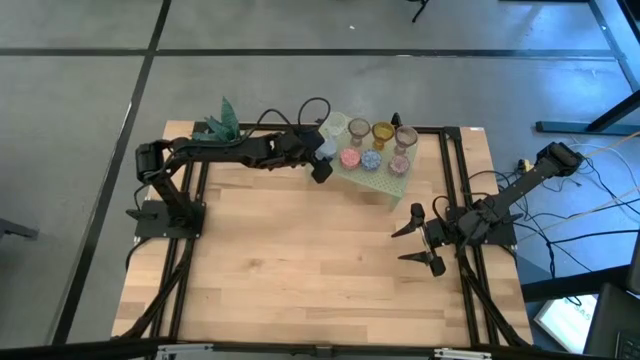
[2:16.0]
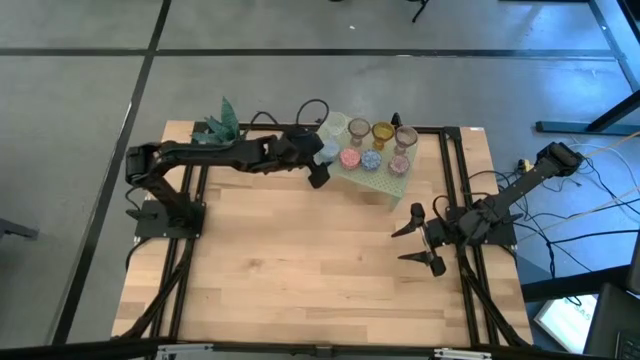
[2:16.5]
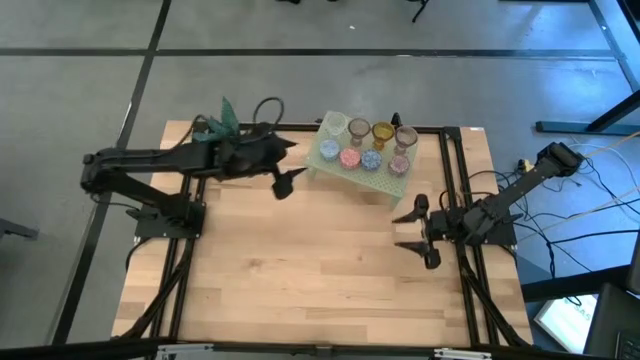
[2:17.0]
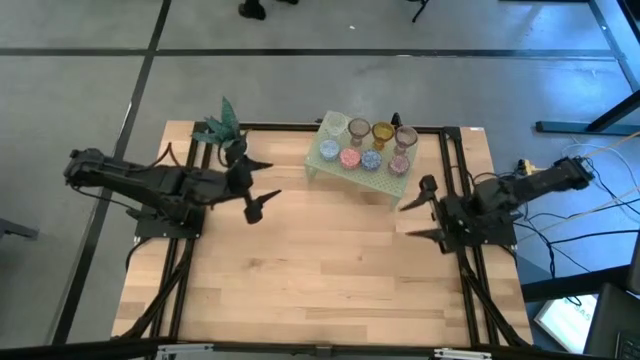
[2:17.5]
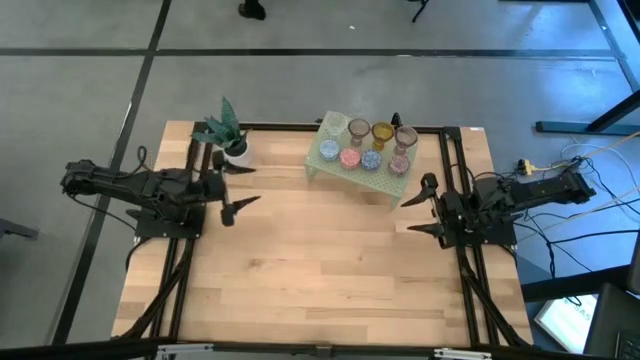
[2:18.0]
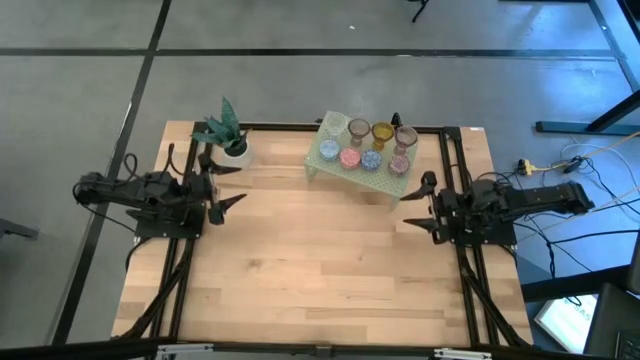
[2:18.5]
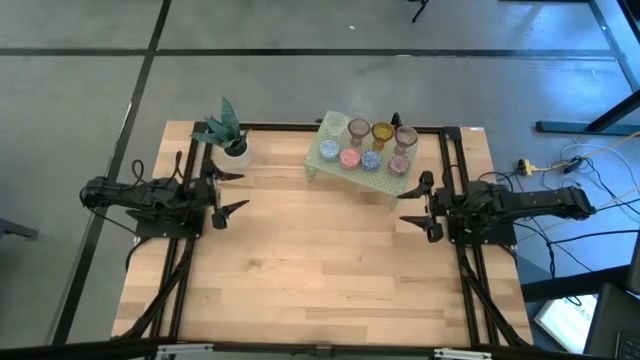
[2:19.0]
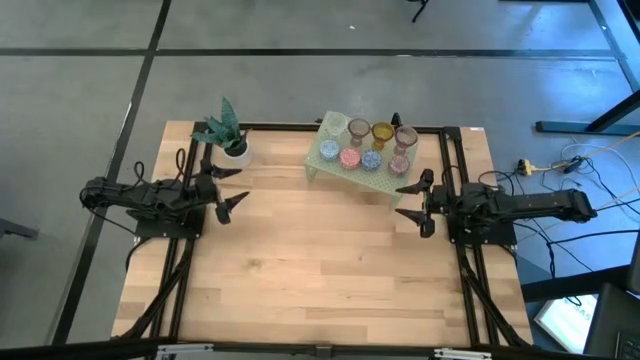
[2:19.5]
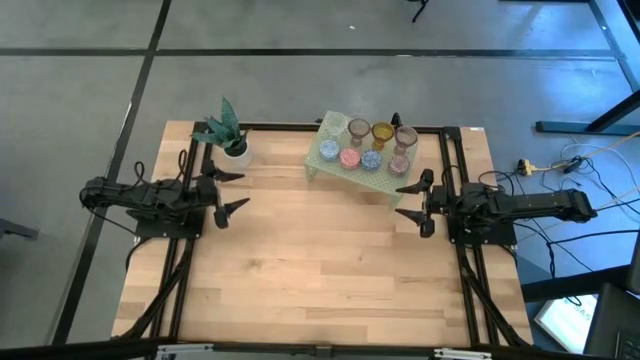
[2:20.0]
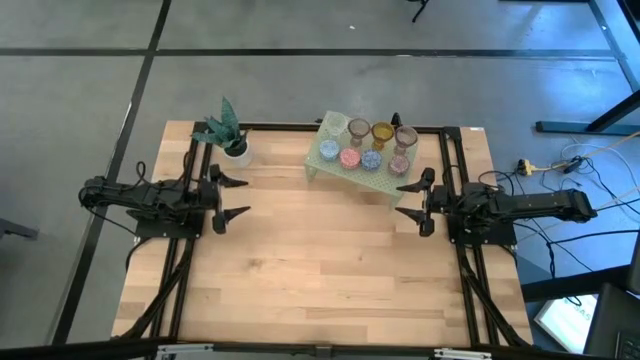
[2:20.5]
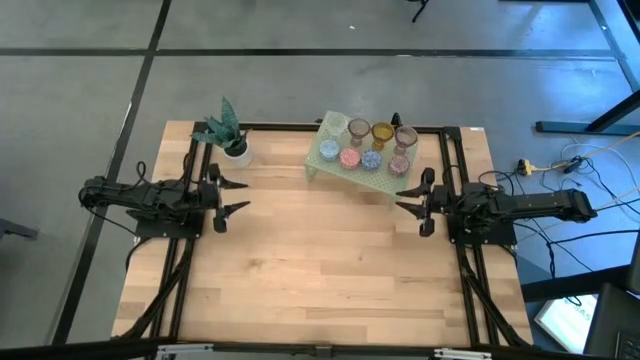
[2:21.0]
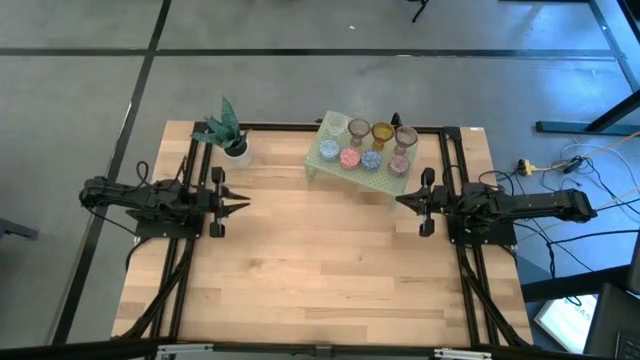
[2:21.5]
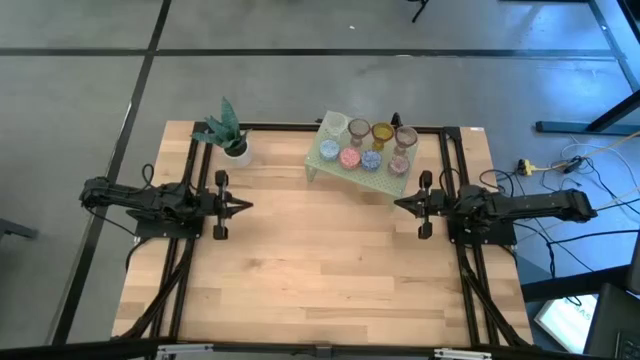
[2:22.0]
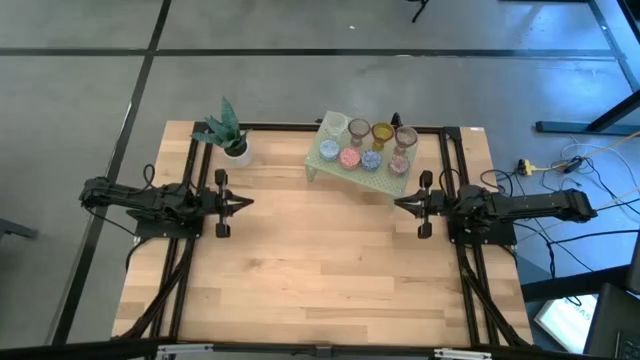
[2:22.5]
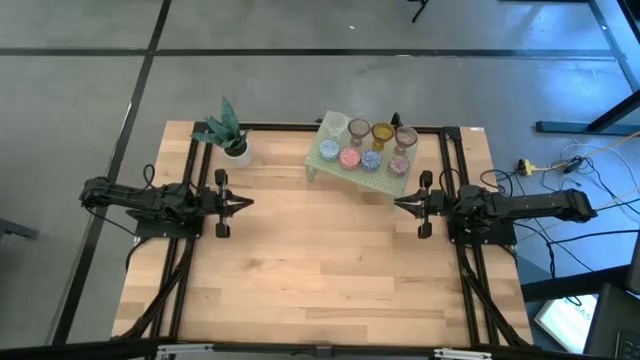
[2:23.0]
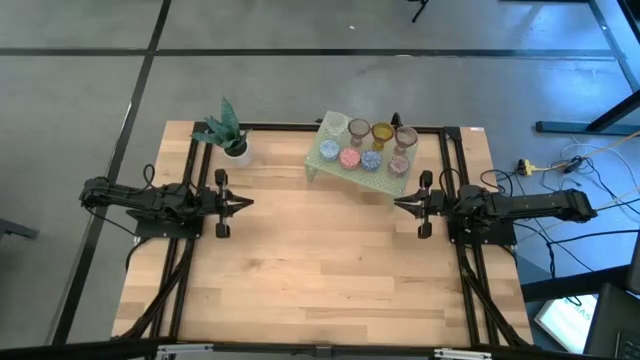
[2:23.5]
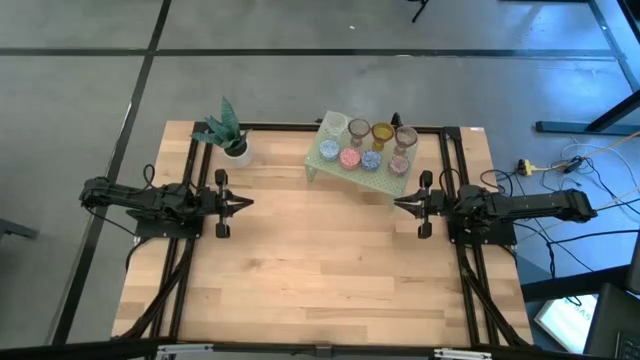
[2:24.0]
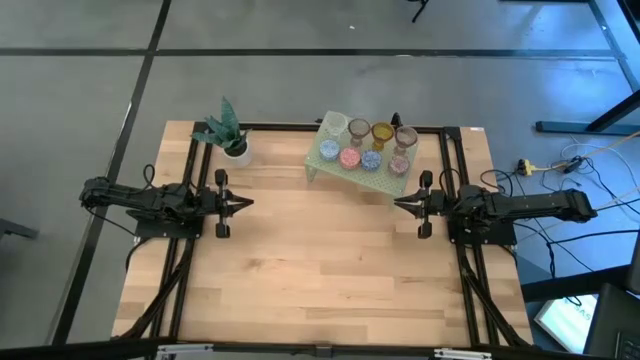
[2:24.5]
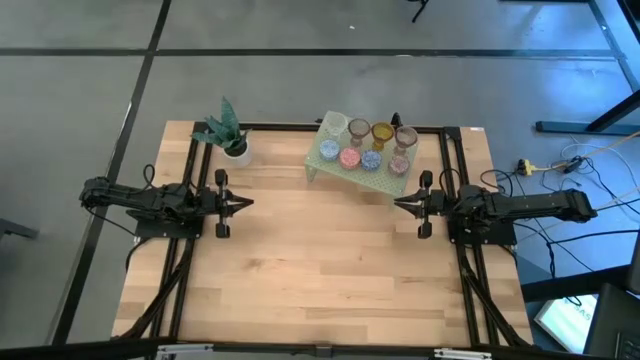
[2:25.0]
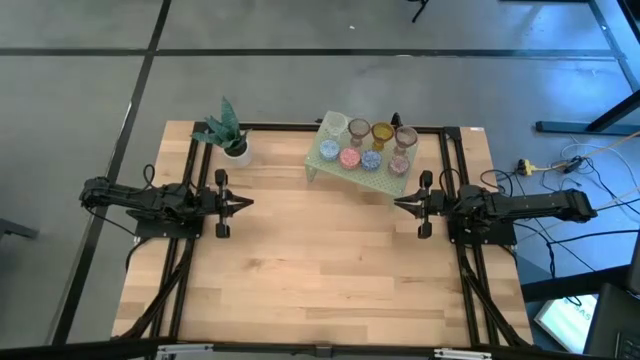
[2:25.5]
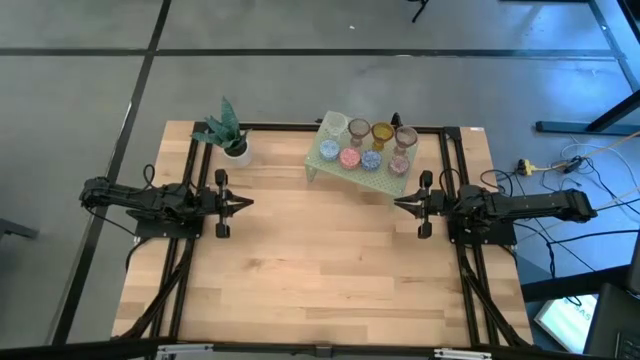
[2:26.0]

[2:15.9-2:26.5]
Task: Pick & Place candle stick holders
Return to Home Position

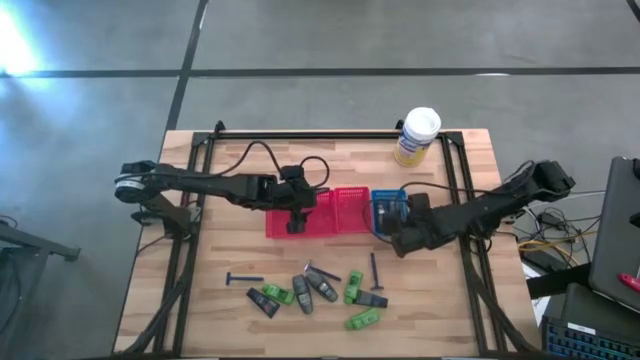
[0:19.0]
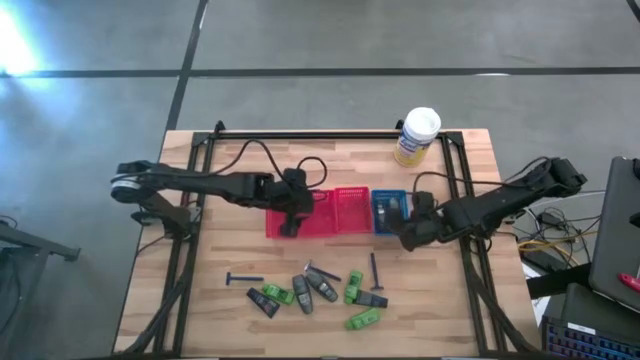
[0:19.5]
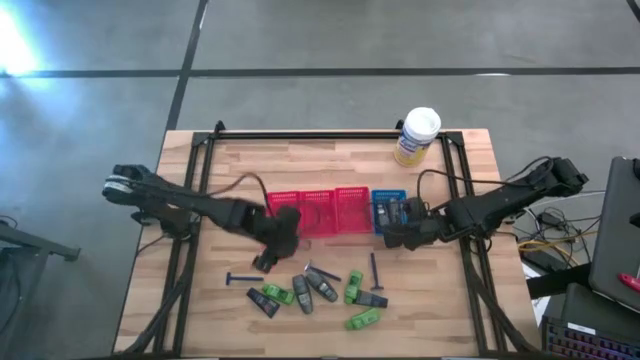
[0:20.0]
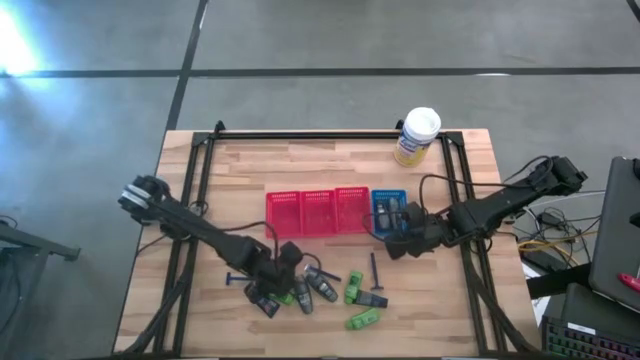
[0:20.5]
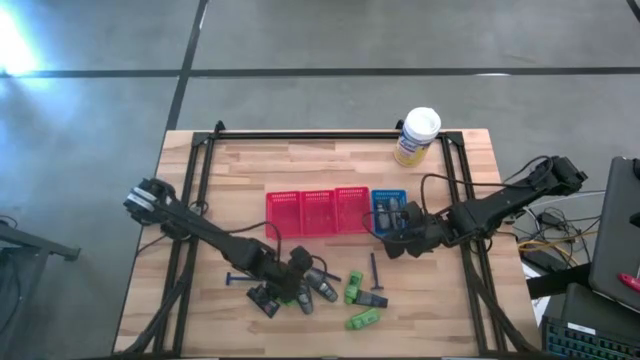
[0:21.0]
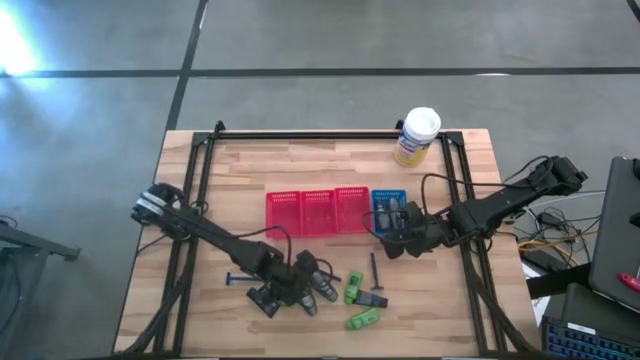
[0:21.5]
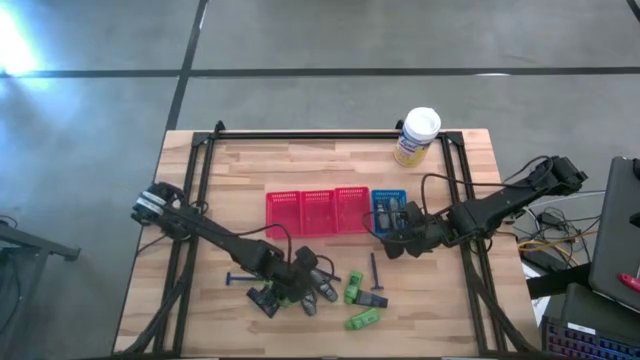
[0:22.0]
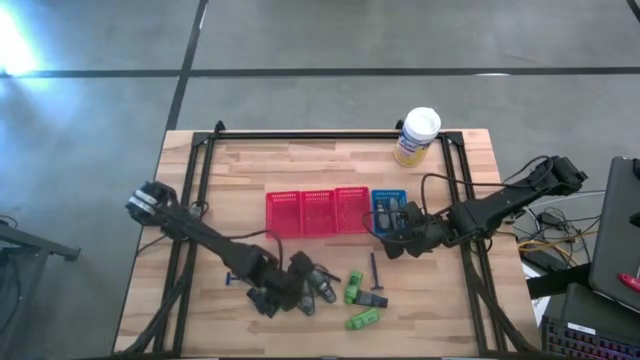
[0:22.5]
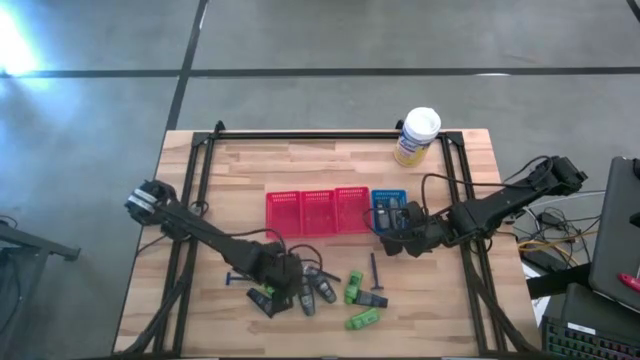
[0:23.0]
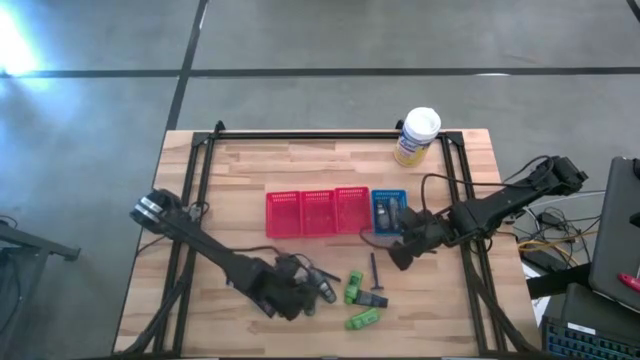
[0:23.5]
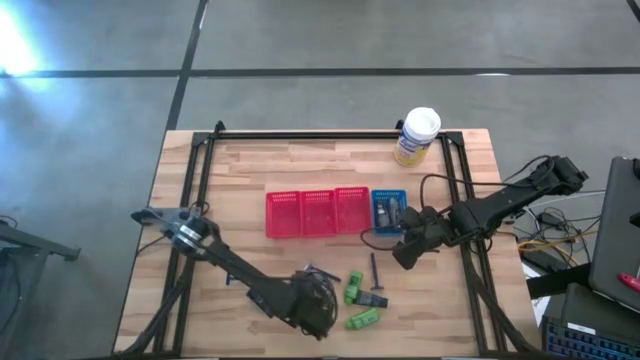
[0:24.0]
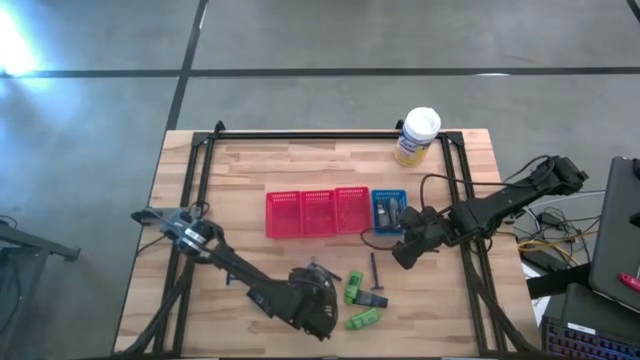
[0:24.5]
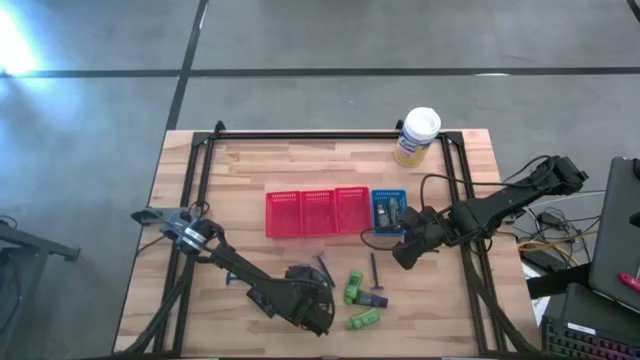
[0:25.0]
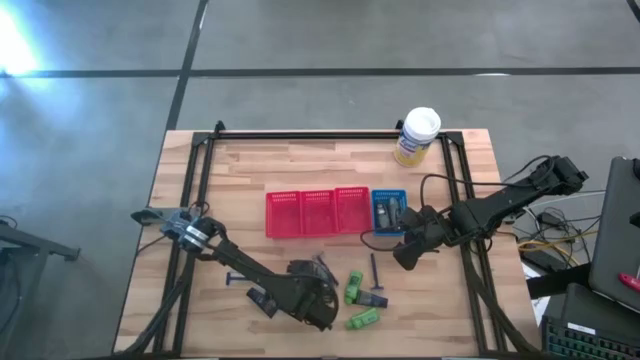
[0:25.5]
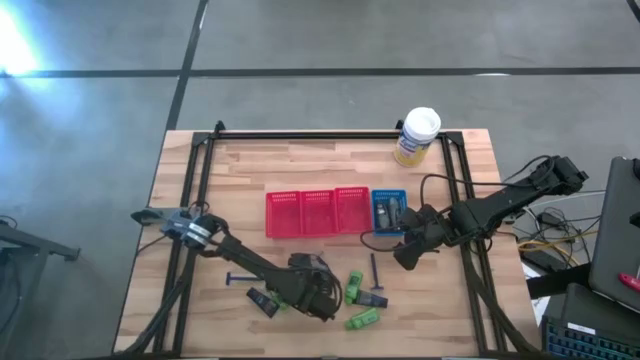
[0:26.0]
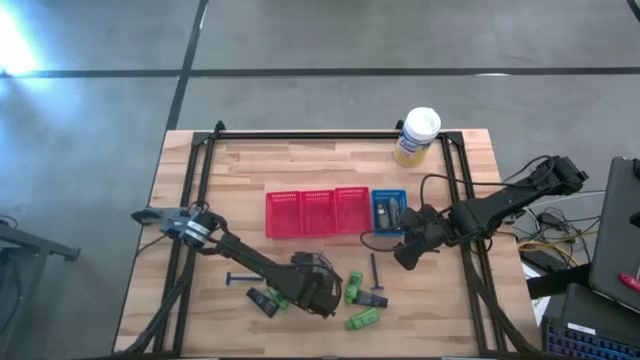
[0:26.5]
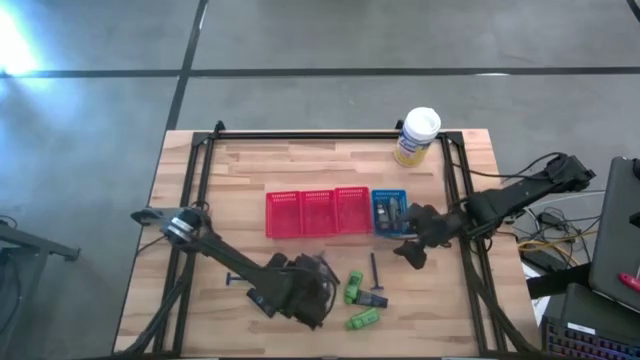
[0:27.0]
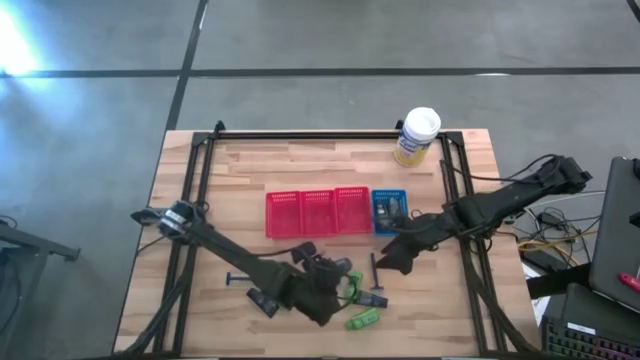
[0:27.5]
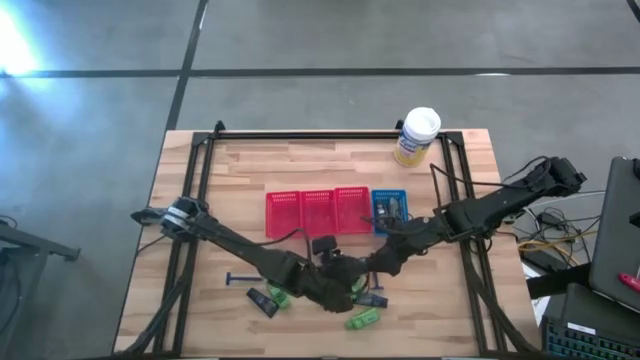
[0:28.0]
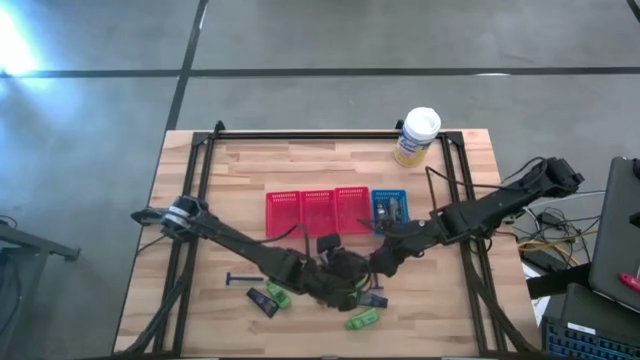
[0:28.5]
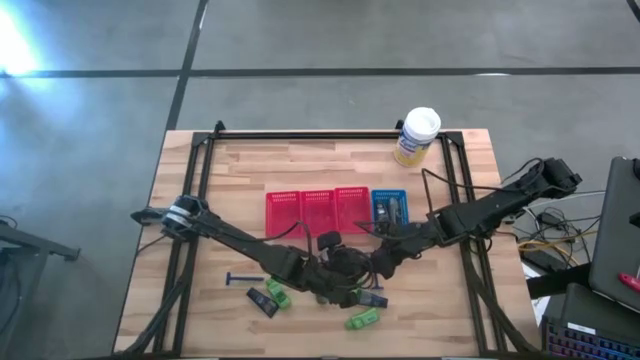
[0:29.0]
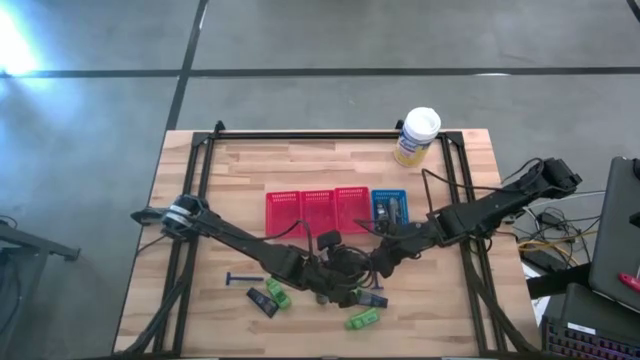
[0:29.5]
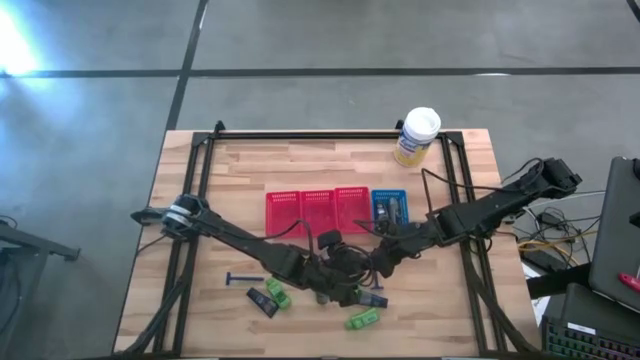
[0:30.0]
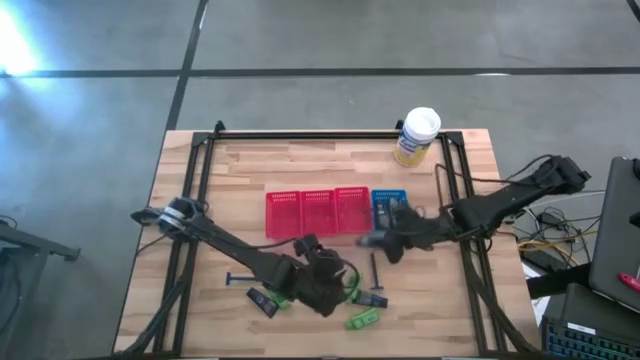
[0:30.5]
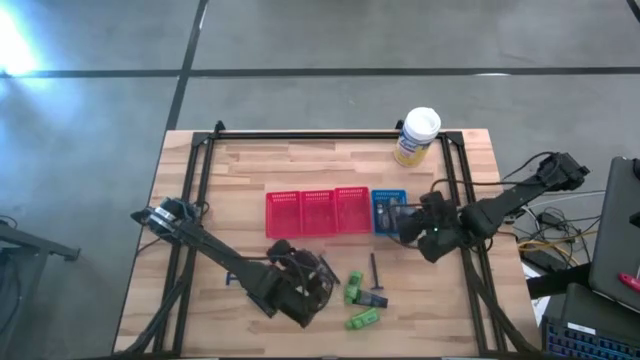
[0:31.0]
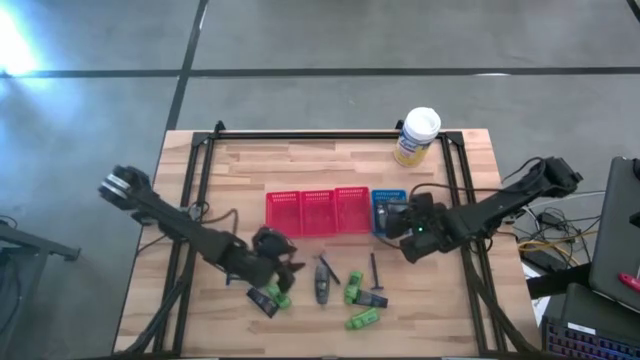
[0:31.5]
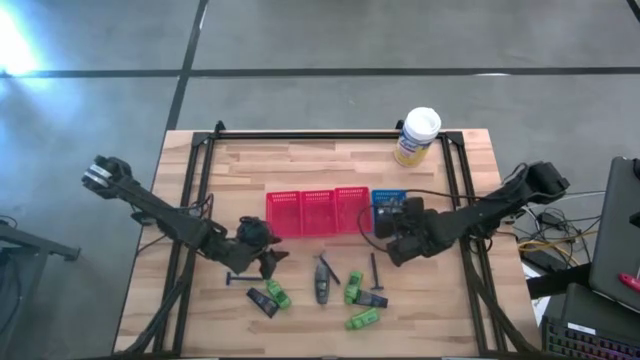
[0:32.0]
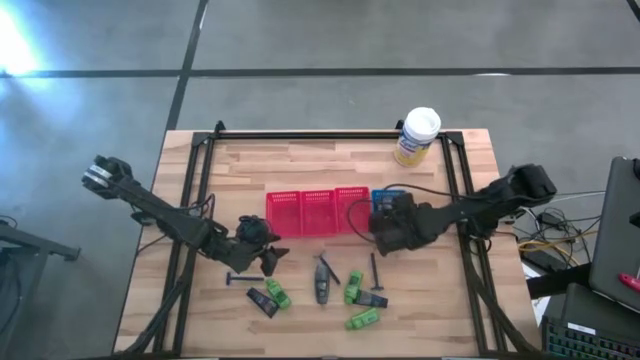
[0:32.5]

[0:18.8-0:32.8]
Task: Pick & Place Travel size toiletries
Put the gray deodorant into the blue bin
